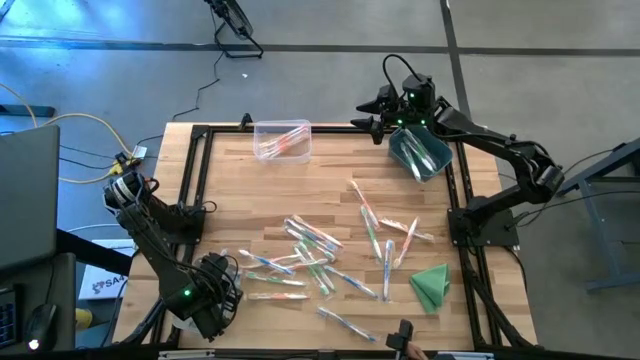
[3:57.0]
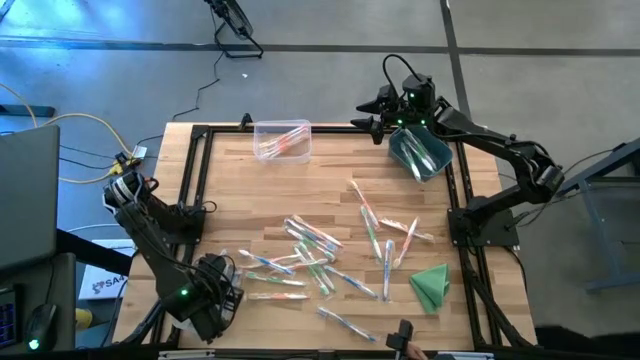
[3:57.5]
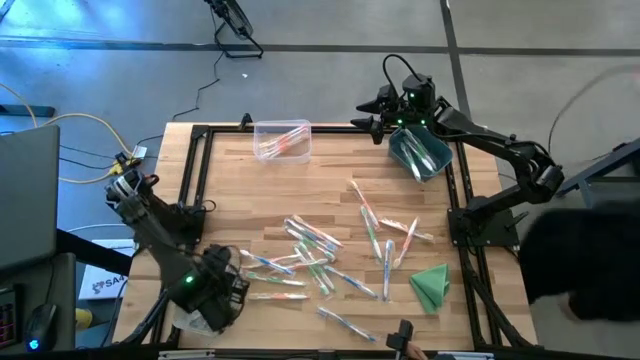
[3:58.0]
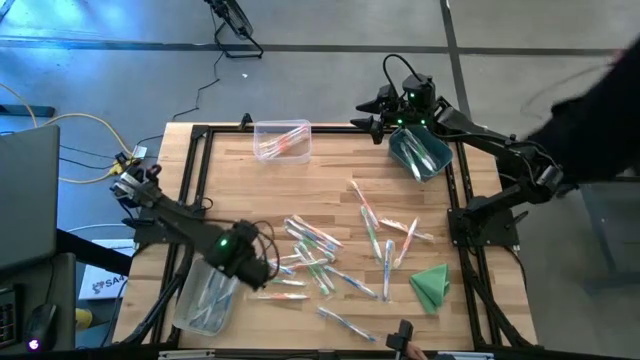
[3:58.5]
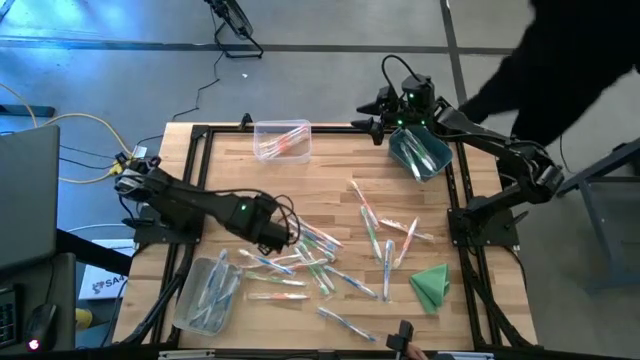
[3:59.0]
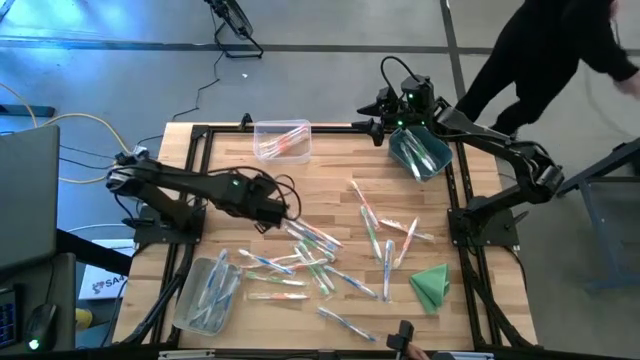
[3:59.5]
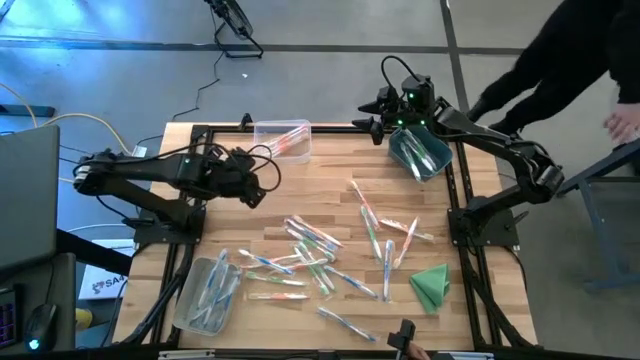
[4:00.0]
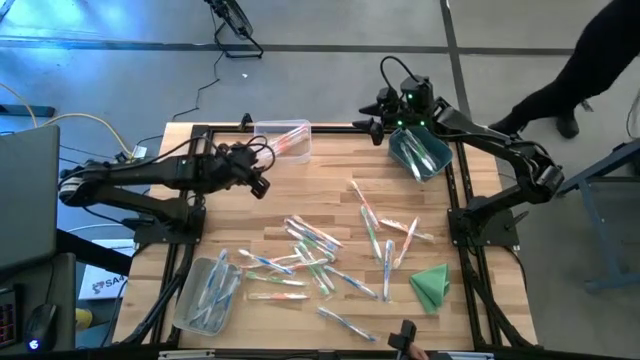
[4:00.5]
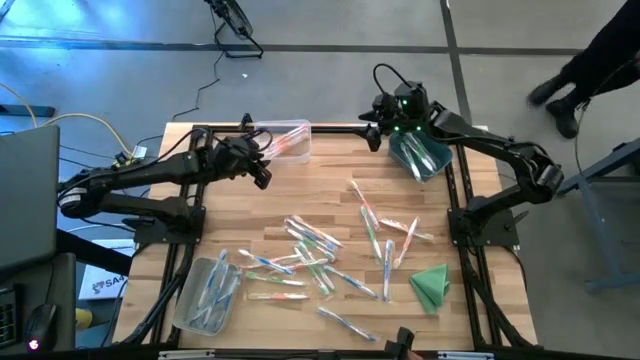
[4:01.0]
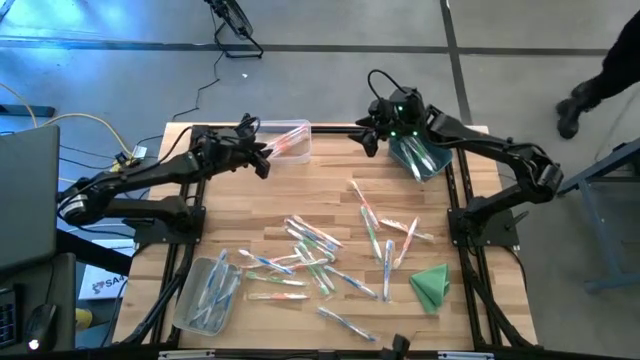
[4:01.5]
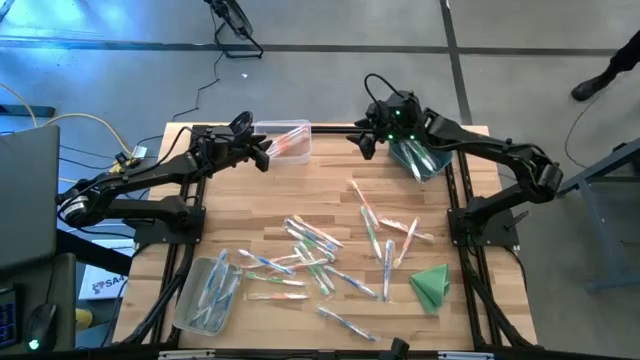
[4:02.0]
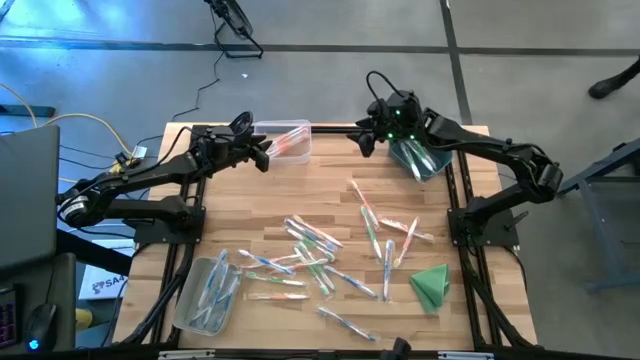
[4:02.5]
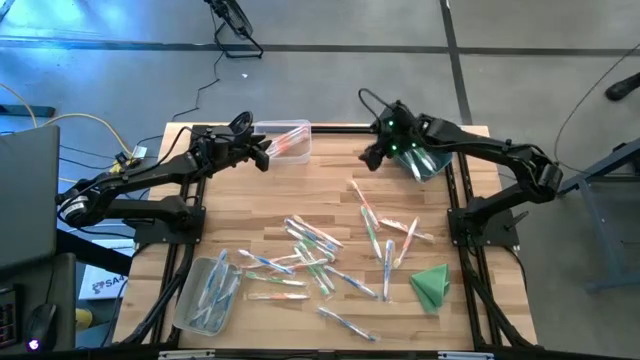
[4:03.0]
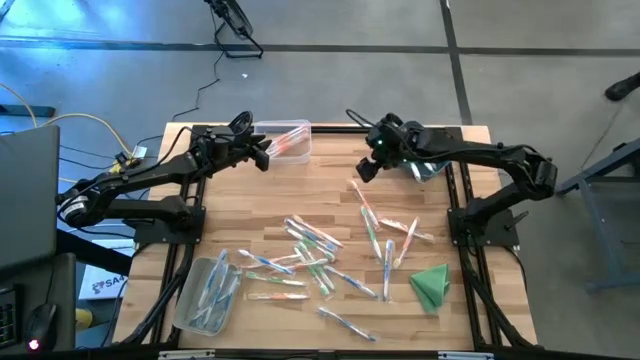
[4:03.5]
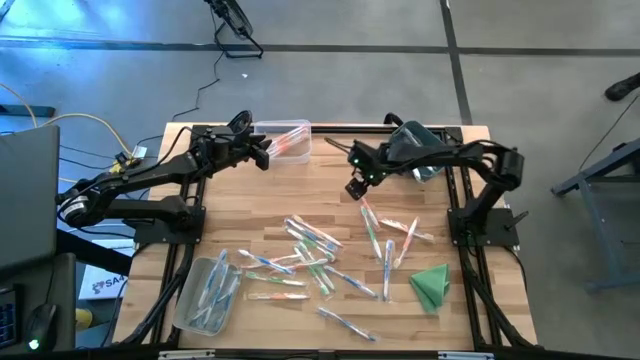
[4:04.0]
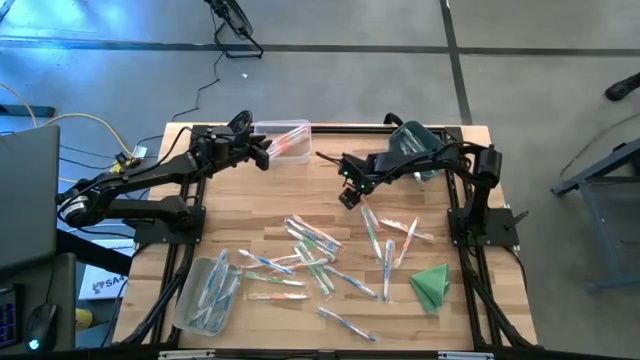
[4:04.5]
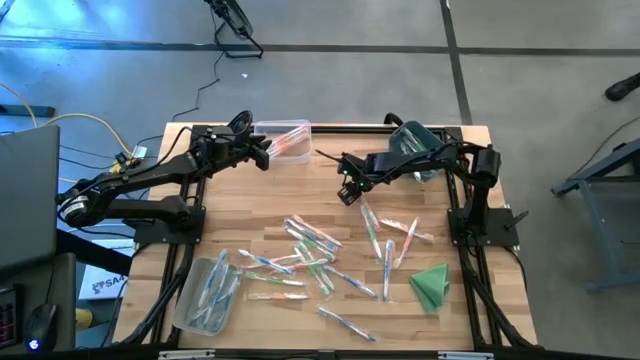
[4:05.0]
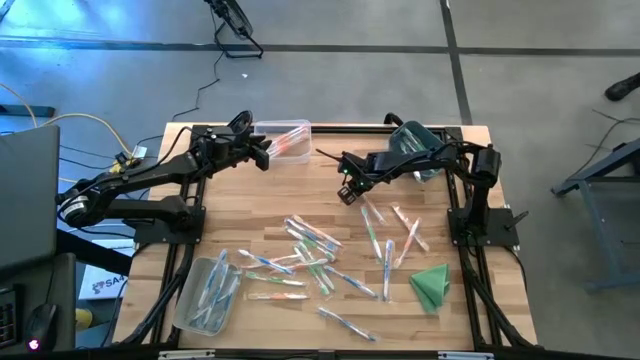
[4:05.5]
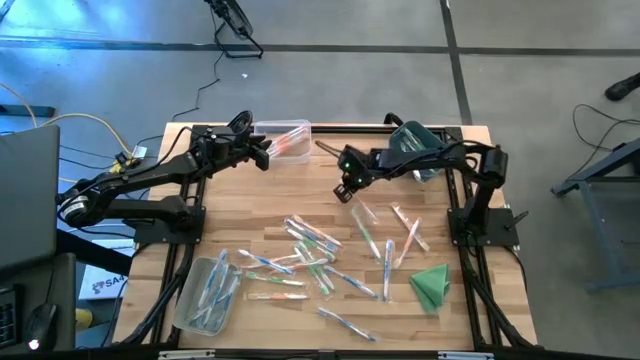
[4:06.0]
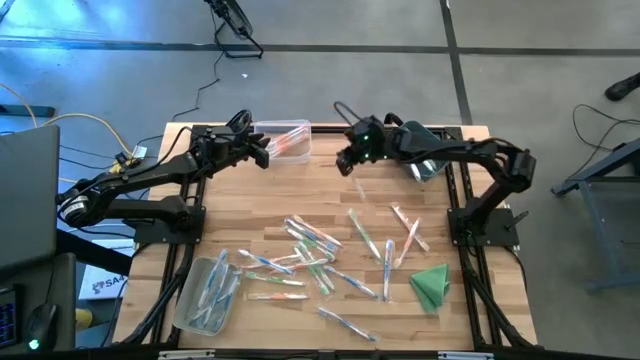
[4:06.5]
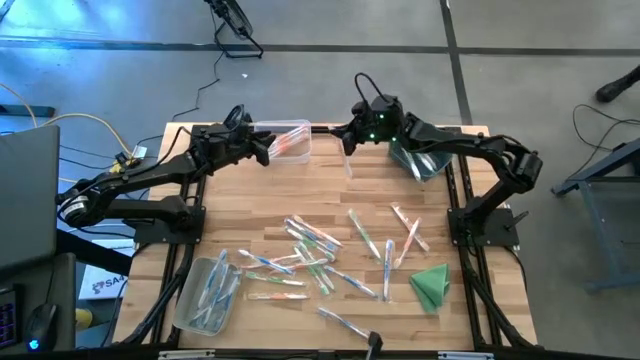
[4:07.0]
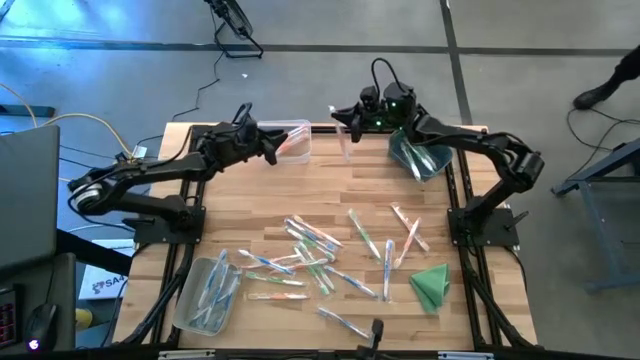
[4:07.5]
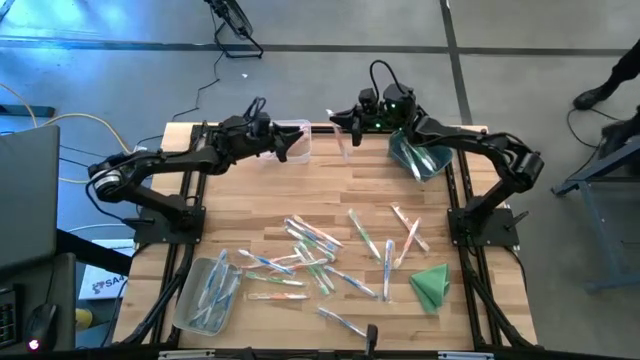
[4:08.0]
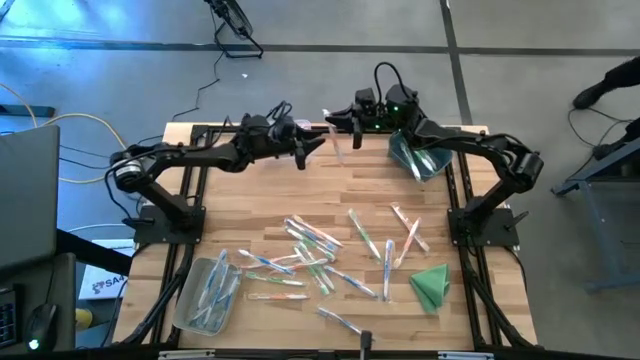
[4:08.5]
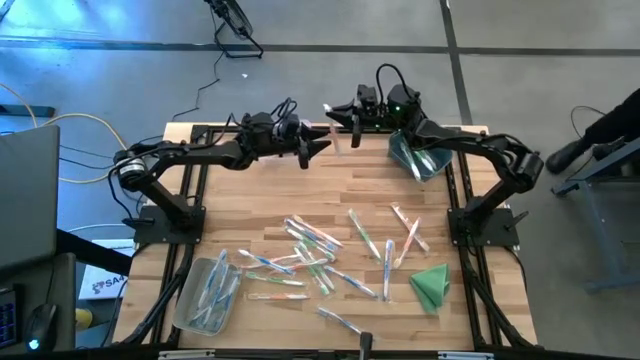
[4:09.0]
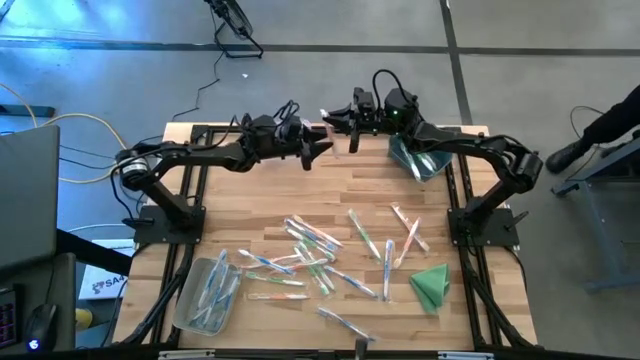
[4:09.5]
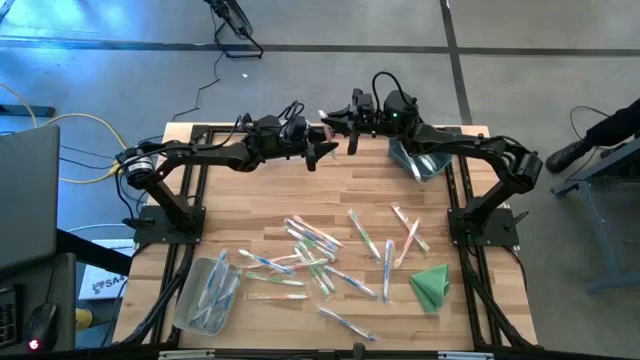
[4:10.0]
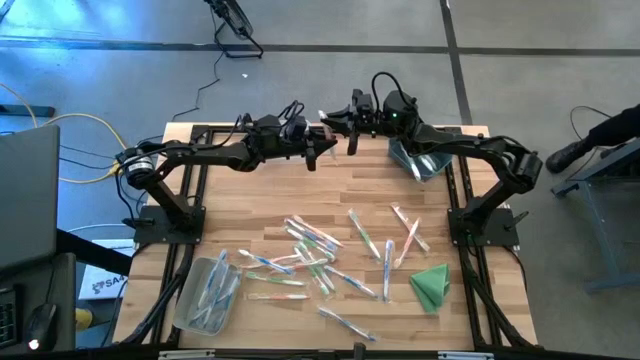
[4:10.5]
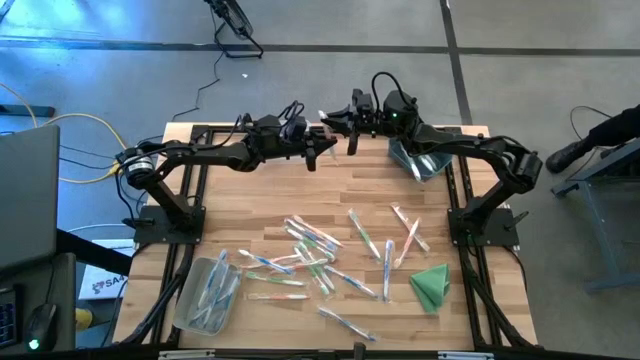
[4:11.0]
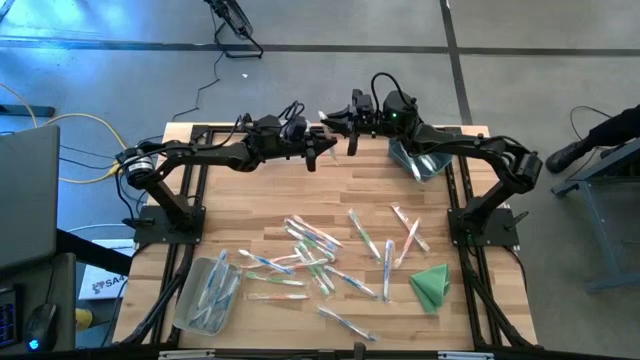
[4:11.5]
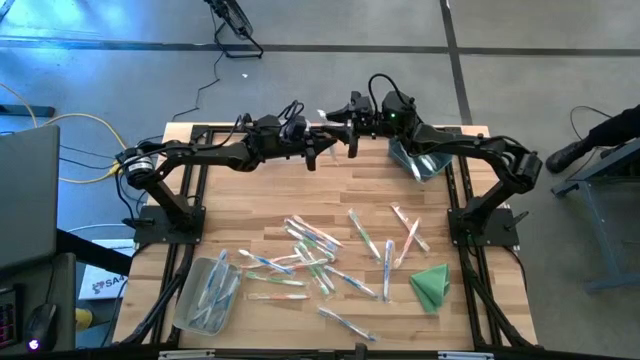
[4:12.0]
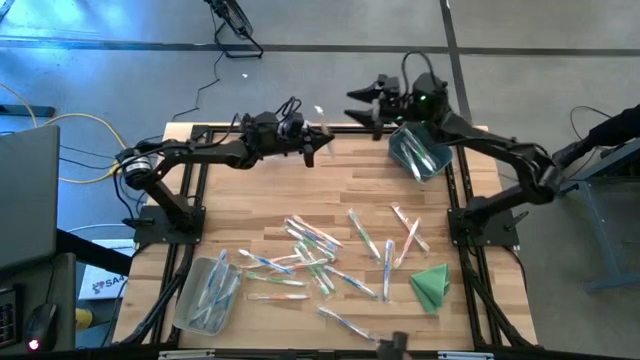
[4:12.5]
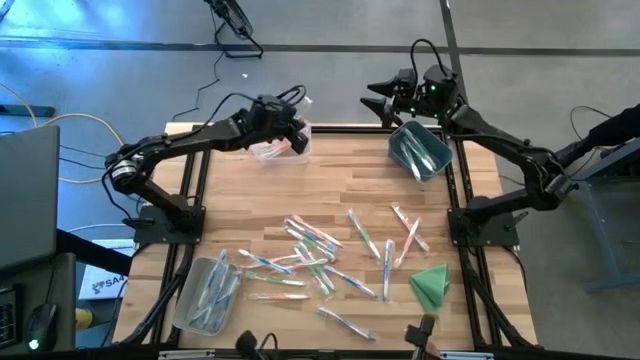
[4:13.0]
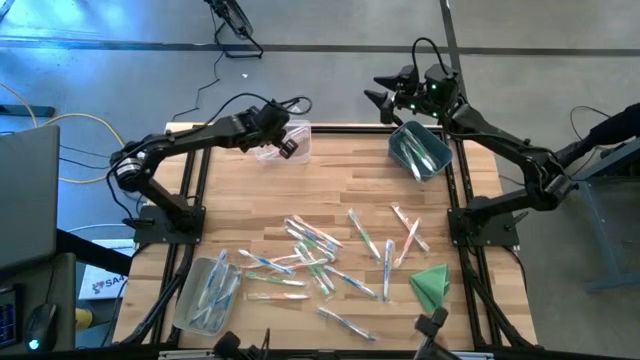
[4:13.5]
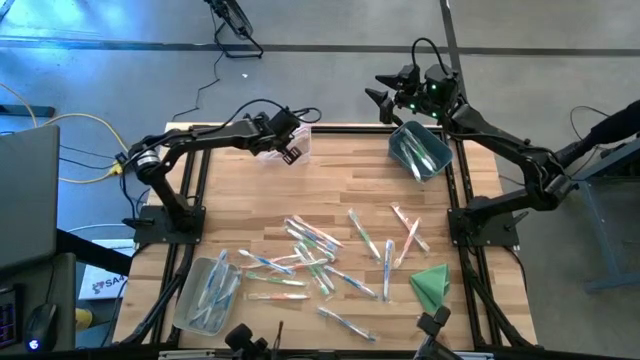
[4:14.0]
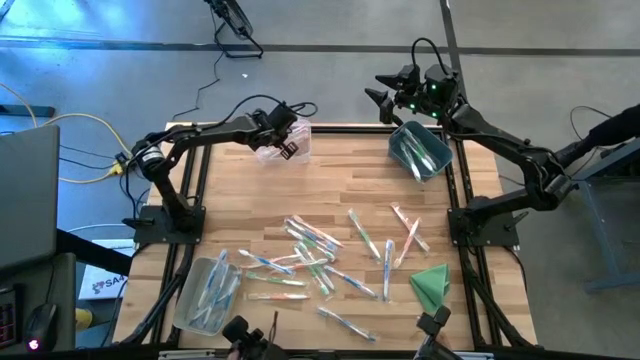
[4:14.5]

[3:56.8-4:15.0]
Task: Pick & Place Toothbrushes
Put the orange toothbrush into the transparent bin
